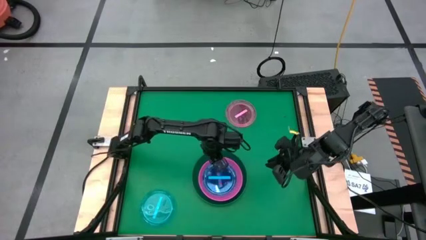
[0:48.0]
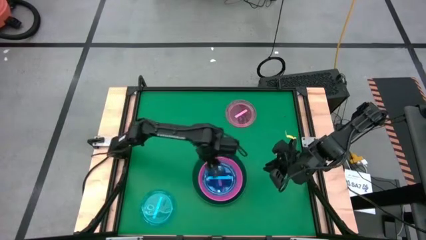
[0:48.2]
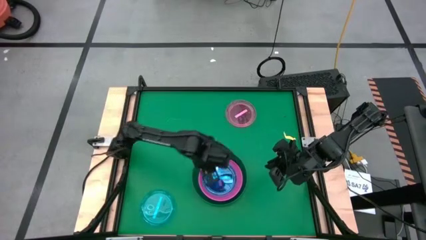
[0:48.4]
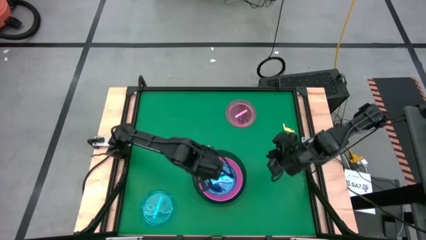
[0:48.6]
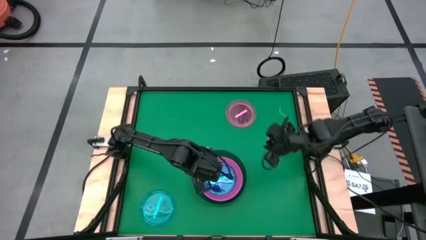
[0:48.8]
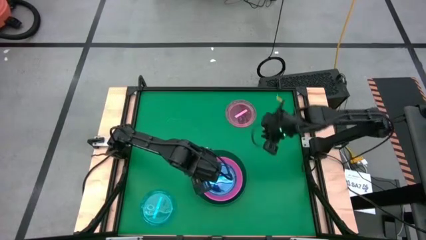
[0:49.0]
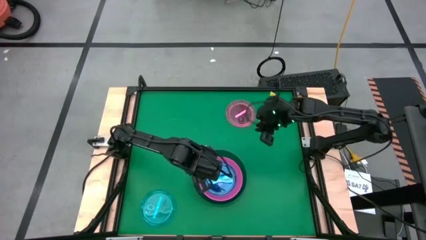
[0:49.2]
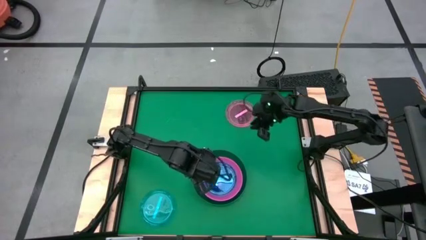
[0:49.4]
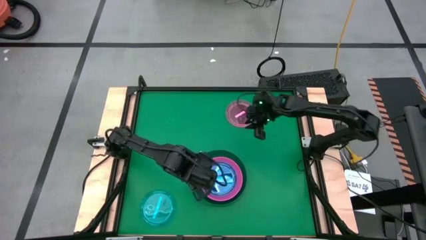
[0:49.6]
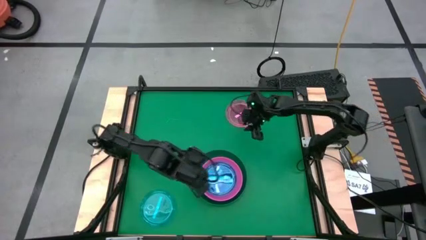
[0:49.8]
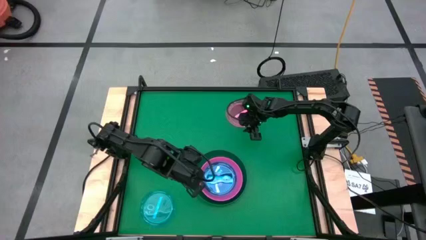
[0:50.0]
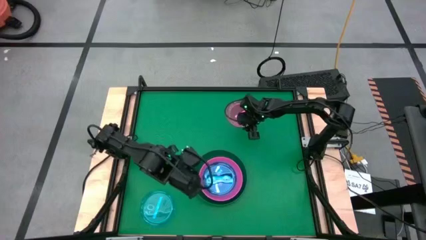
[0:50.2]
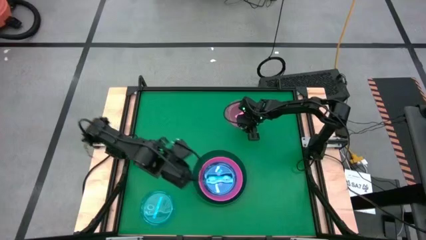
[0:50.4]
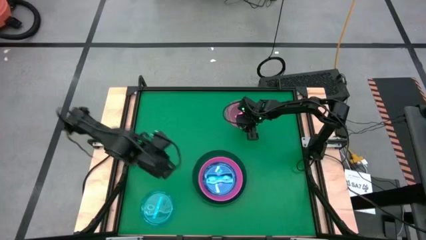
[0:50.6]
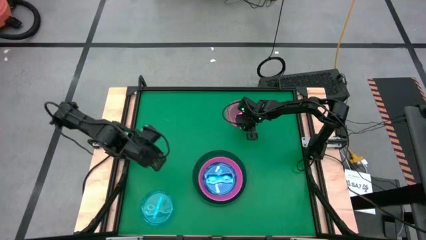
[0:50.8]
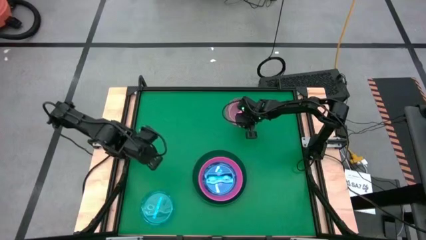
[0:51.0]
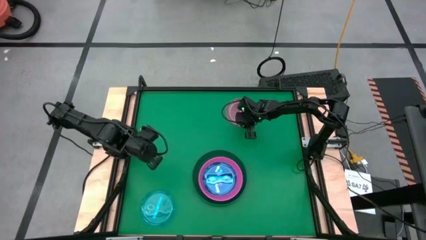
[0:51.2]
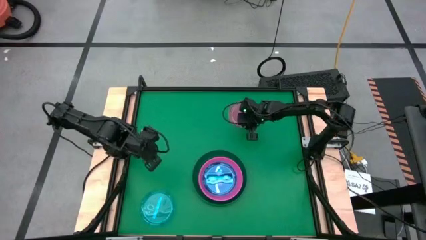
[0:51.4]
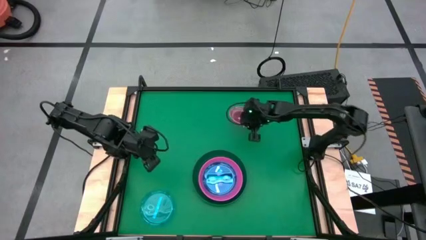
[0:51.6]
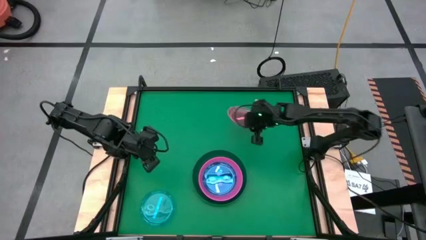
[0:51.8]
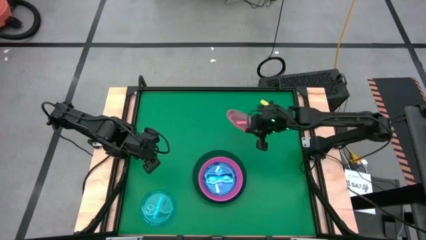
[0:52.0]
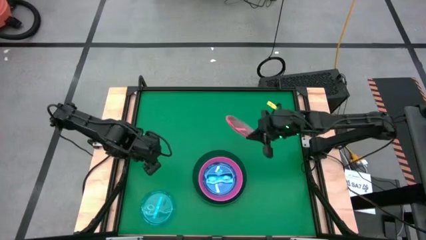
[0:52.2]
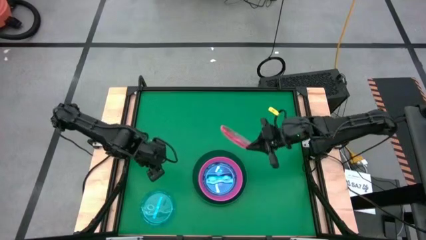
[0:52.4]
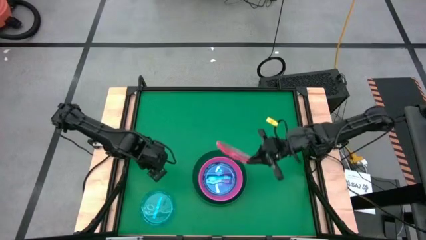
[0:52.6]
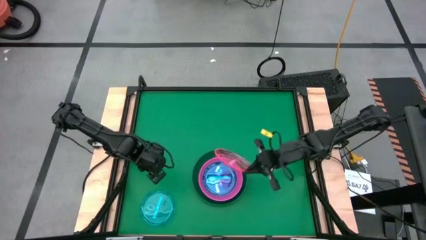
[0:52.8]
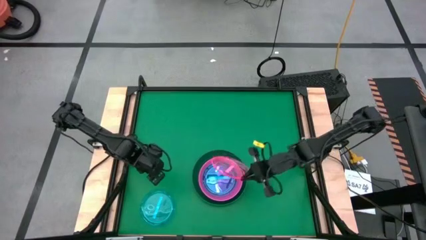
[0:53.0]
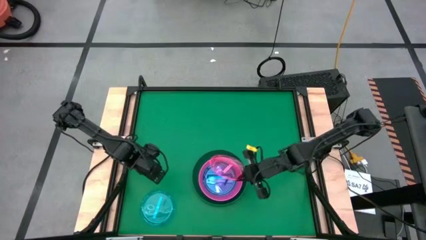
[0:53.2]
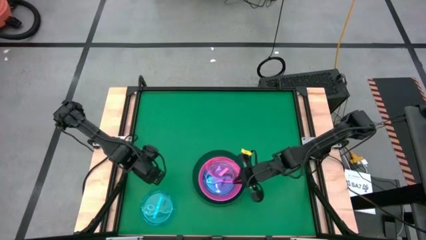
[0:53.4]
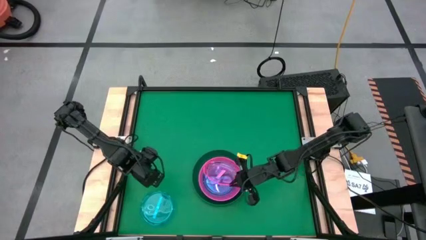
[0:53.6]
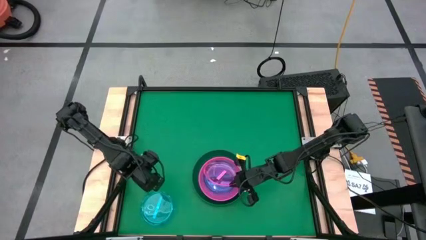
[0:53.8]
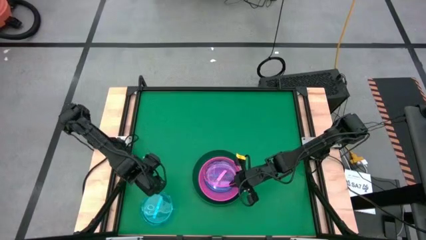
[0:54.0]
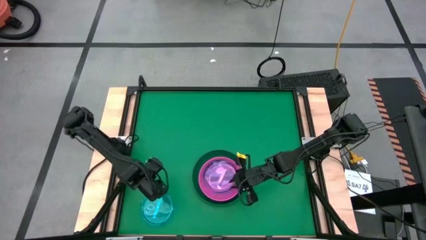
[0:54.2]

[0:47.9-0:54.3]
Task: Stack plastic plates
Stack the pink transparent plate on top of the blue transparent plate

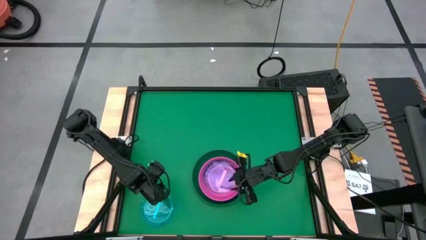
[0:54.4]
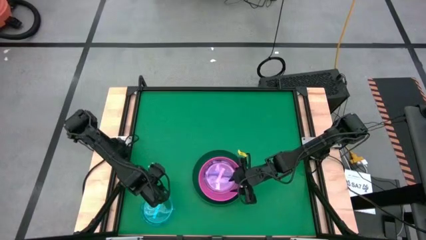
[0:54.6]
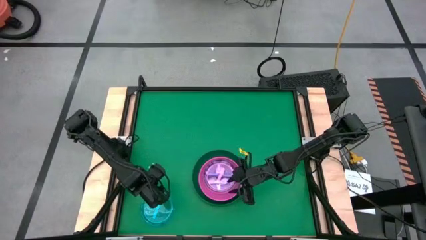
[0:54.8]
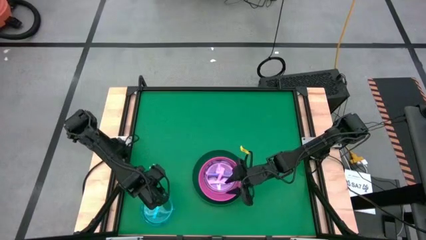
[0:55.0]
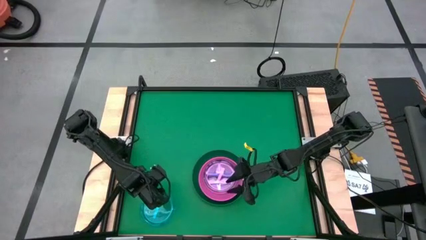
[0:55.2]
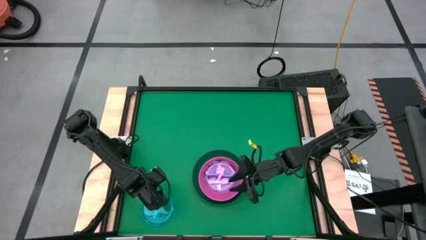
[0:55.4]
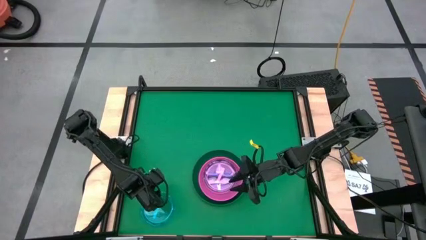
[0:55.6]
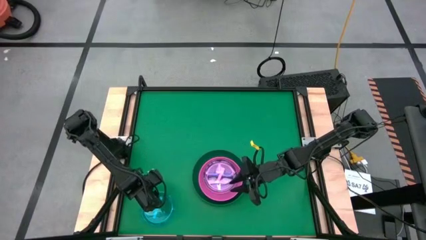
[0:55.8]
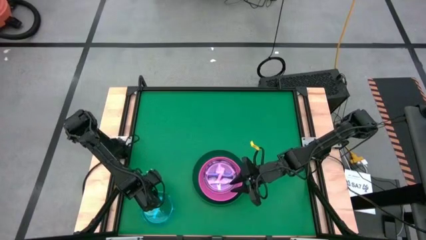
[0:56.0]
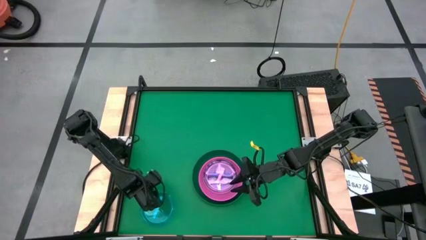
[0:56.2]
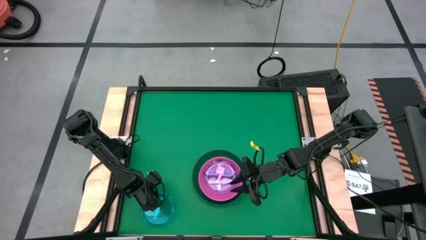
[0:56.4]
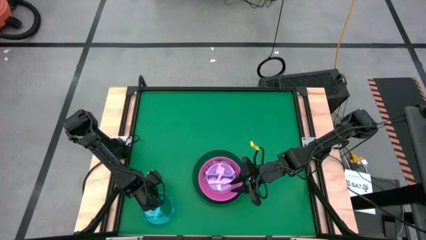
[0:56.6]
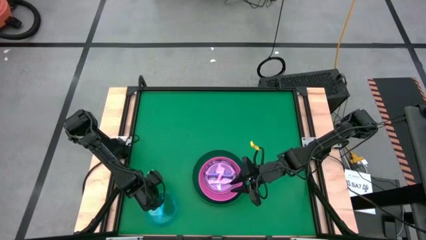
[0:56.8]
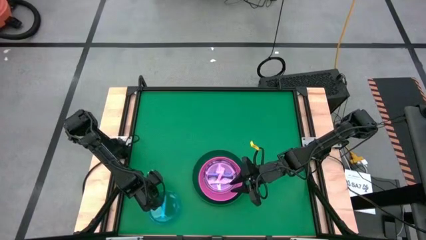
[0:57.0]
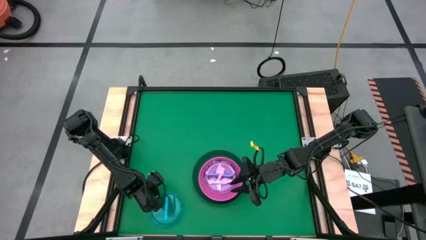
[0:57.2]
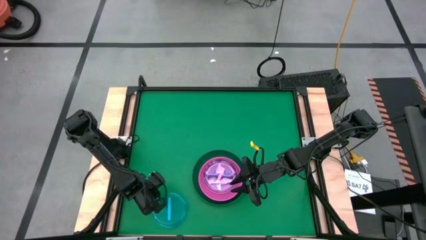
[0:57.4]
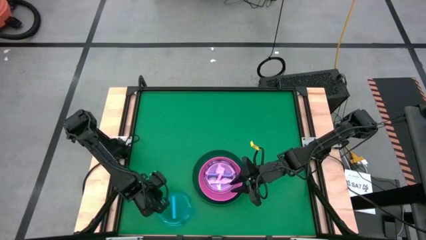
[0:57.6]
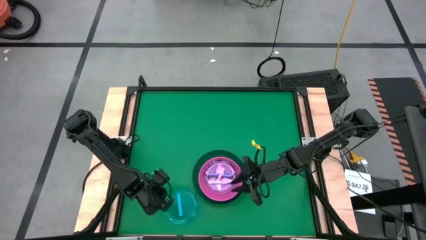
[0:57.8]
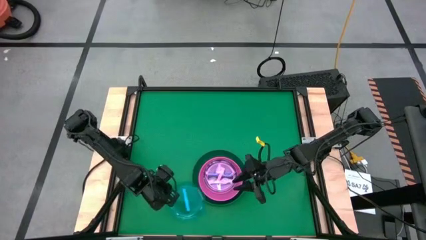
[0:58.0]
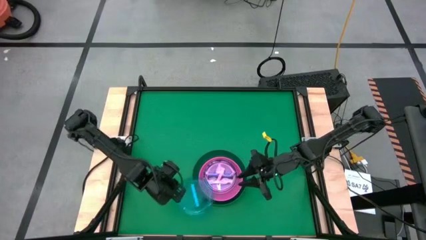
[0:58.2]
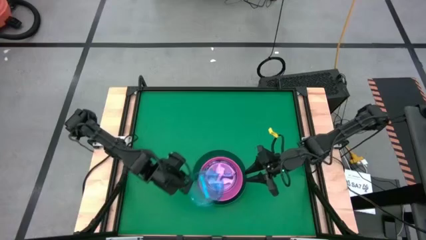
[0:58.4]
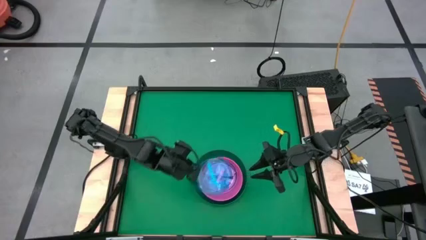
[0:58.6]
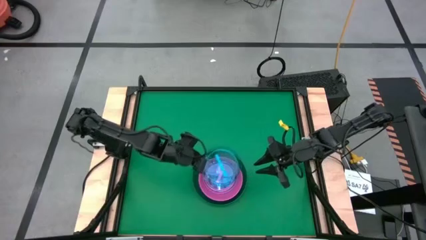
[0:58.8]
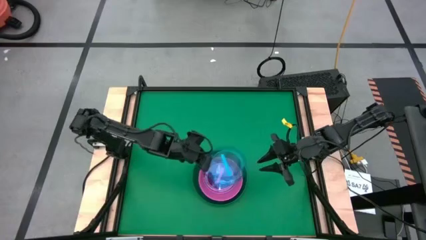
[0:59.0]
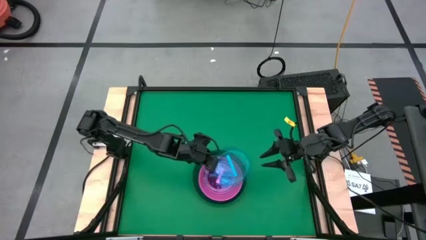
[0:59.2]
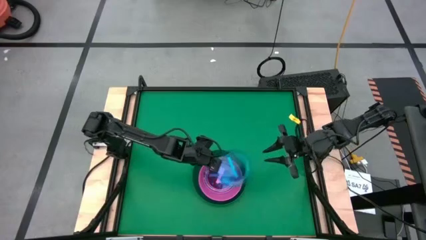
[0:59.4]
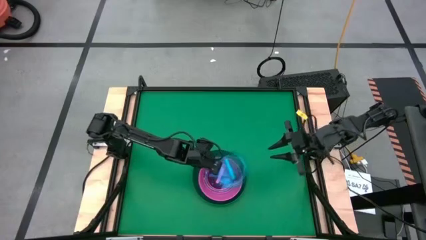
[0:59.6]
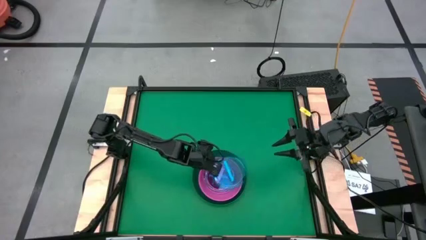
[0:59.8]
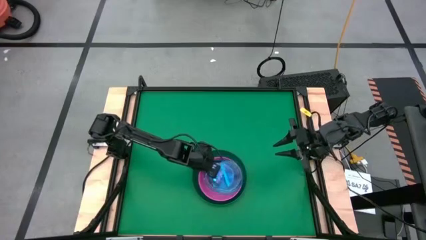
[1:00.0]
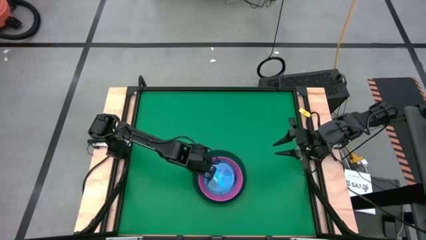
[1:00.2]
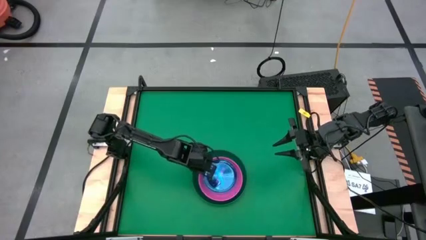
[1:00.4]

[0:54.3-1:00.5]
Stack the blue transparent plate on top of the pink transparent plate
